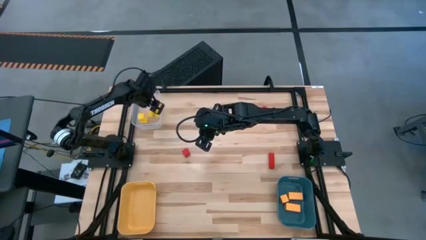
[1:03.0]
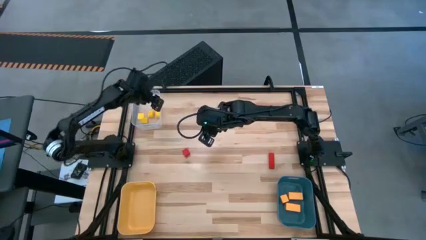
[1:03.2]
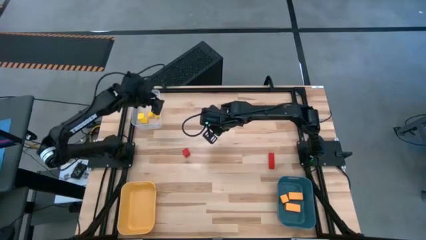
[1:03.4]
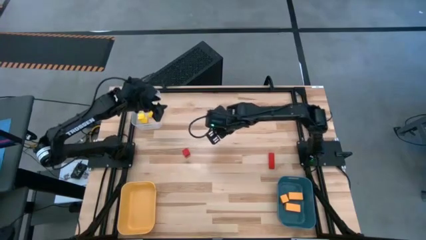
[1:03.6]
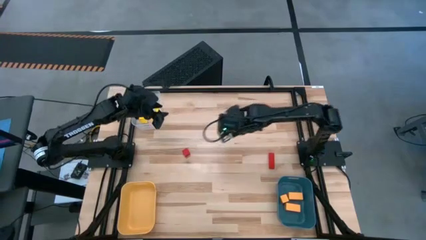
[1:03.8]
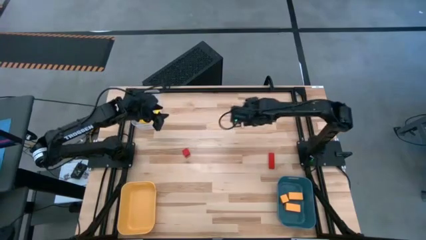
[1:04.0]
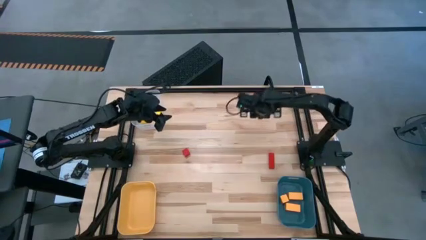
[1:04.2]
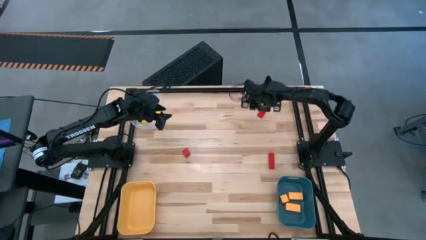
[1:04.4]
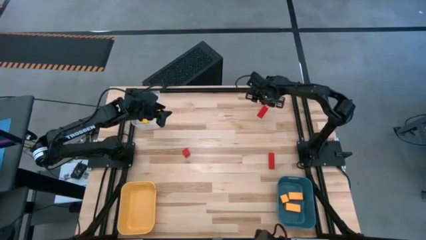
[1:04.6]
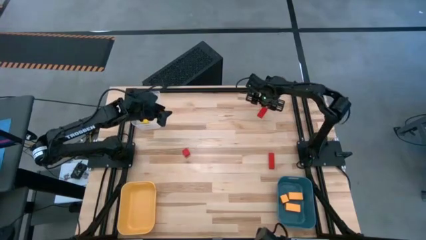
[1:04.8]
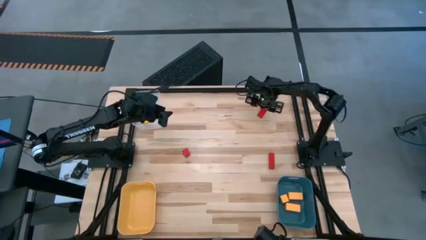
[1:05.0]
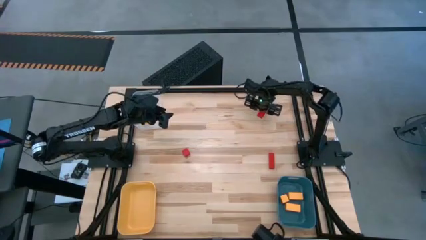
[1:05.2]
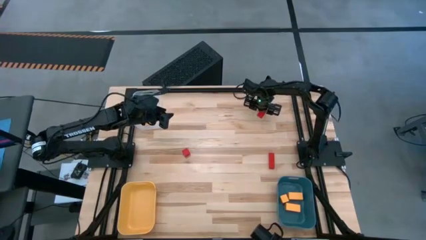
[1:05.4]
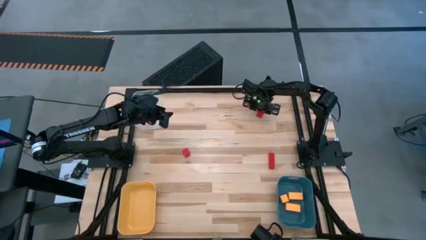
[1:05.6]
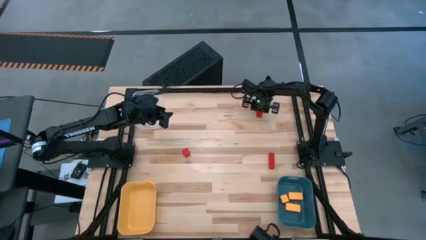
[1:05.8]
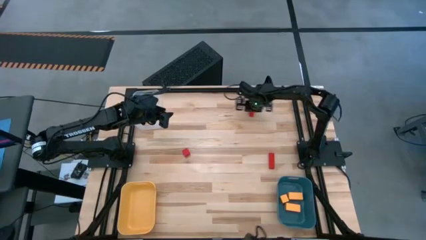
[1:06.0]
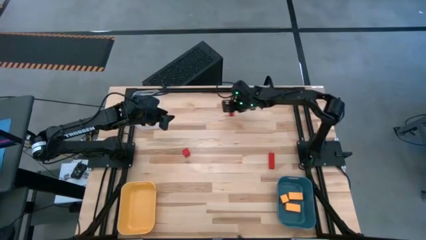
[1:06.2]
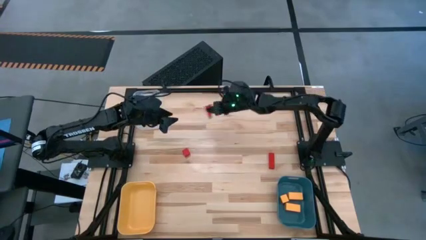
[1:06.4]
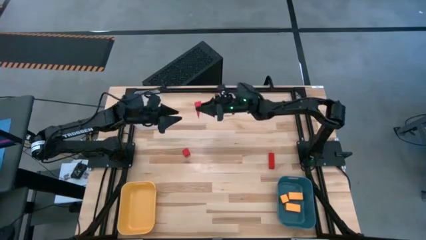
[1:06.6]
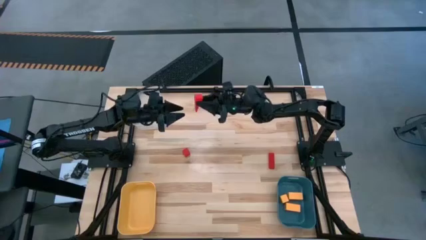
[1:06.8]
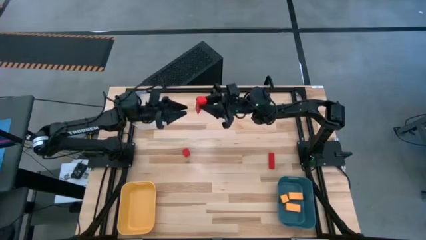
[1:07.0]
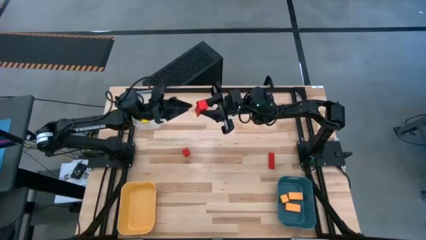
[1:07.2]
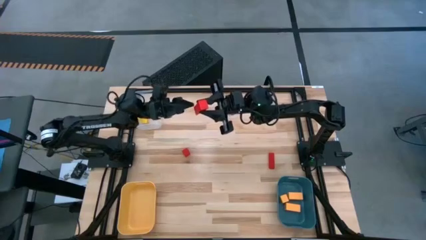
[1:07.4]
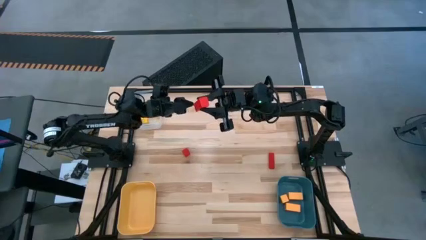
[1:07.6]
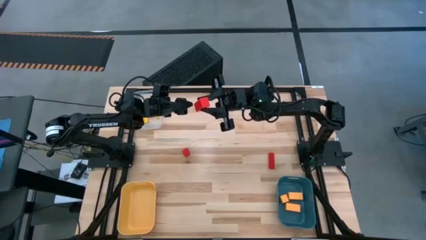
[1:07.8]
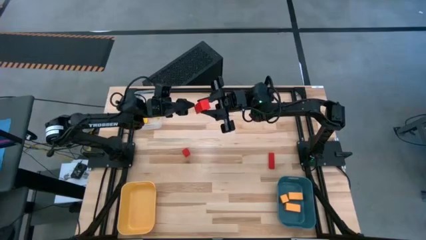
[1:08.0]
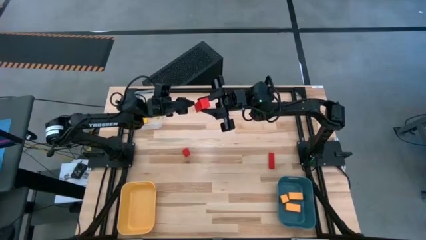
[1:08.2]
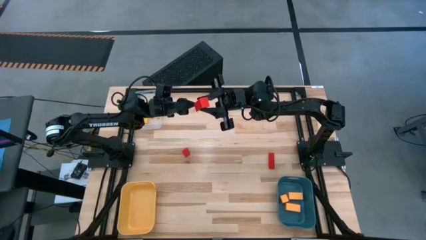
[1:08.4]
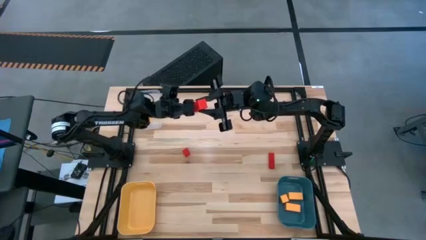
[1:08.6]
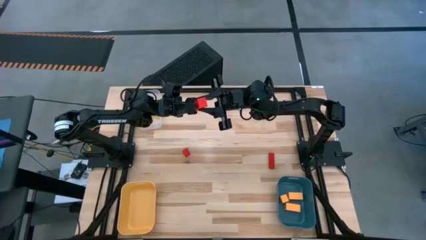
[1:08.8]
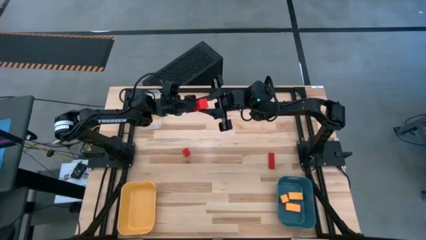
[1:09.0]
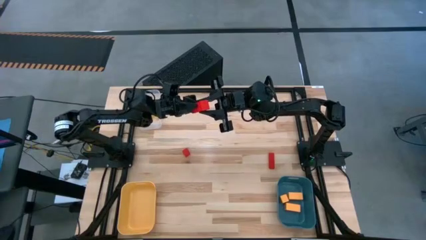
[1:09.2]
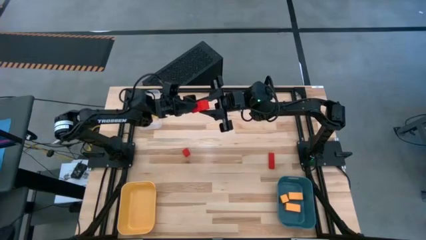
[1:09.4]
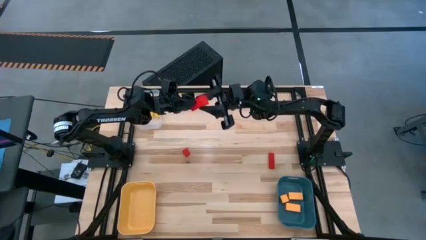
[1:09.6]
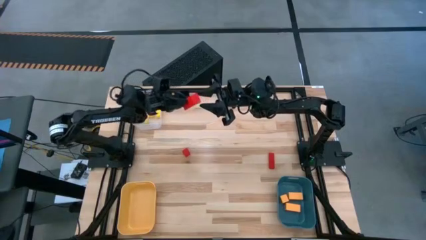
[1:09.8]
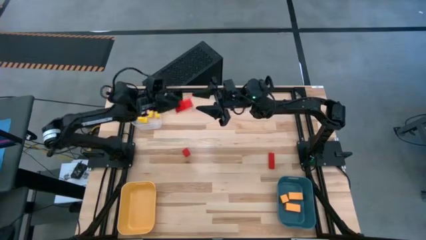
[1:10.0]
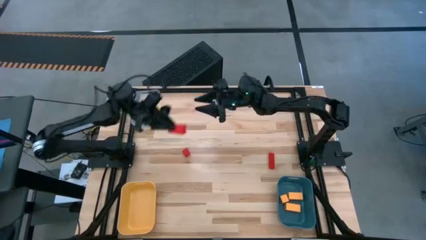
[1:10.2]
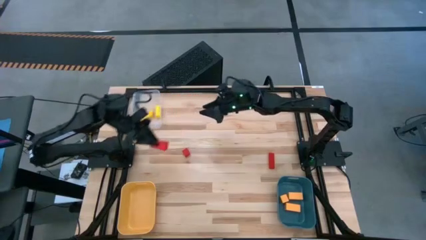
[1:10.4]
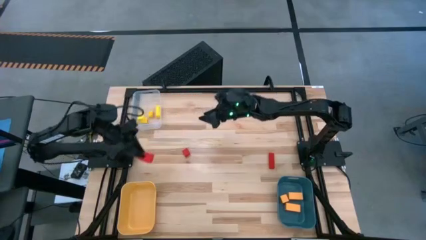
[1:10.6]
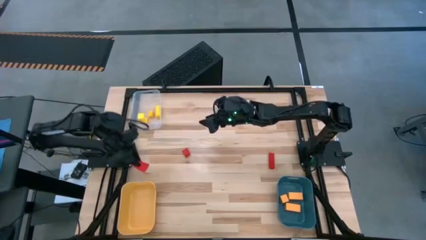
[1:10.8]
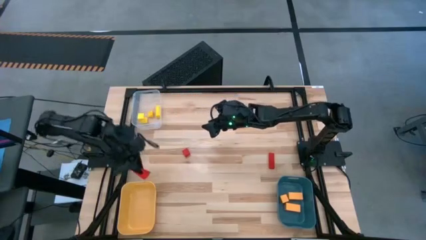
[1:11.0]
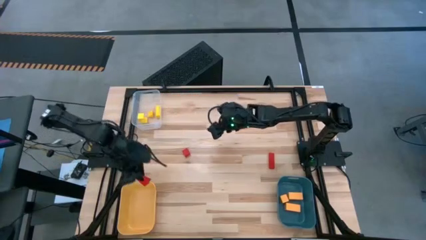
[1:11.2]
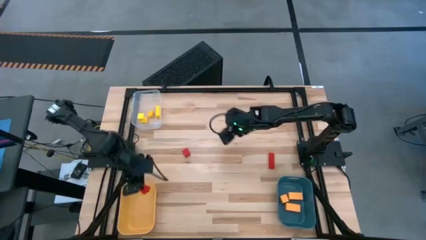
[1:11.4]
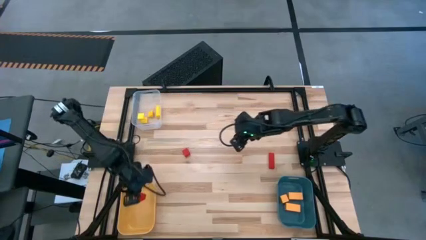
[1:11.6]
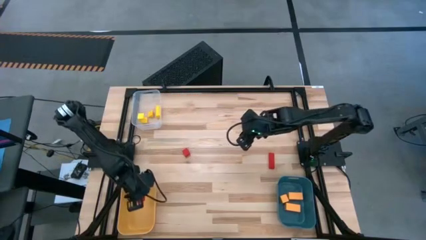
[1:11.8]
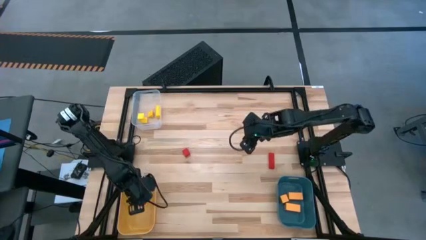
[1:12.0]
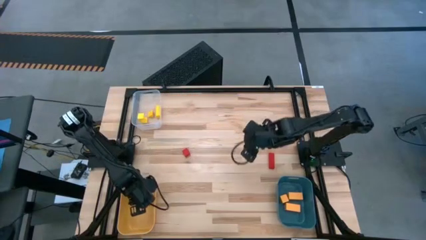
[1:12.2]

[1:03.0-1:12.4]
Task: Sort & place blocks by color
Put the top right red block into the yellow bin

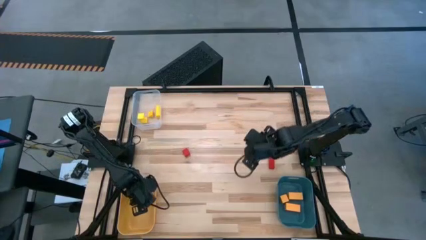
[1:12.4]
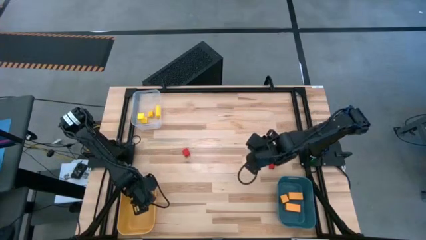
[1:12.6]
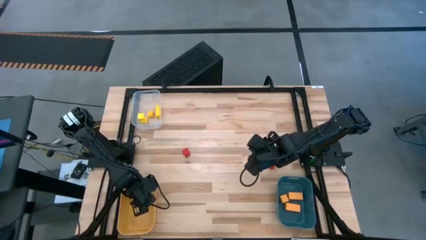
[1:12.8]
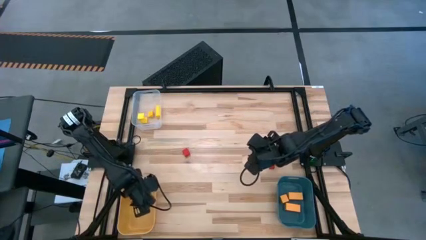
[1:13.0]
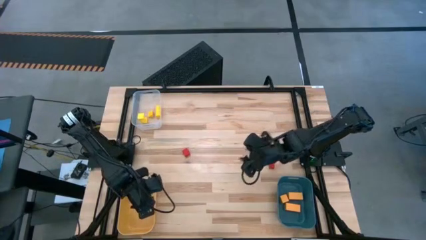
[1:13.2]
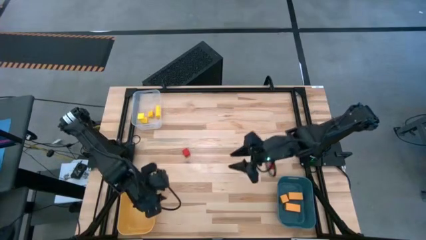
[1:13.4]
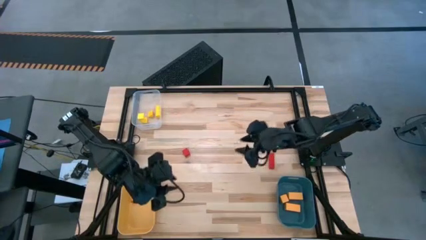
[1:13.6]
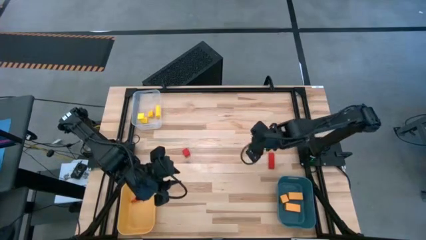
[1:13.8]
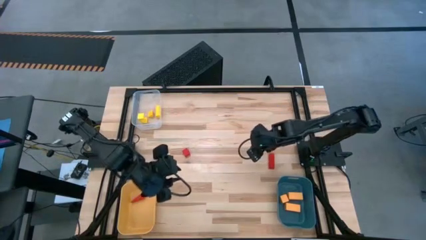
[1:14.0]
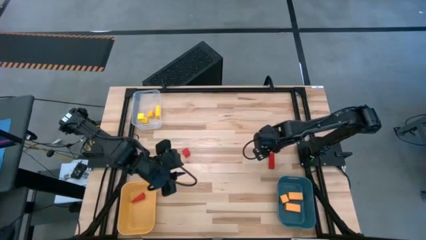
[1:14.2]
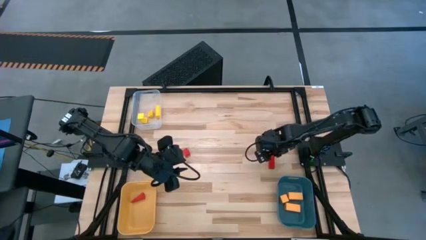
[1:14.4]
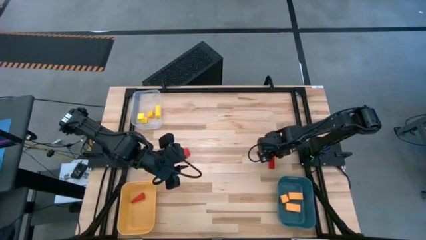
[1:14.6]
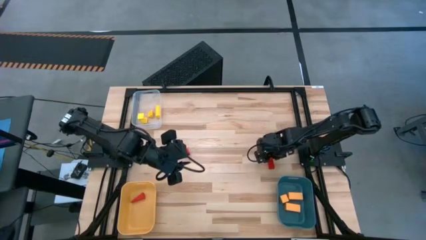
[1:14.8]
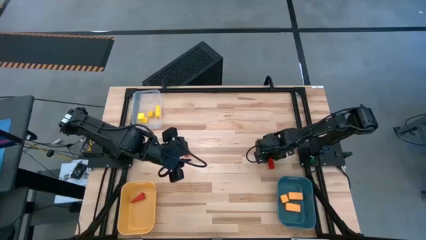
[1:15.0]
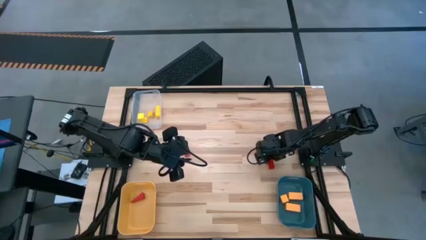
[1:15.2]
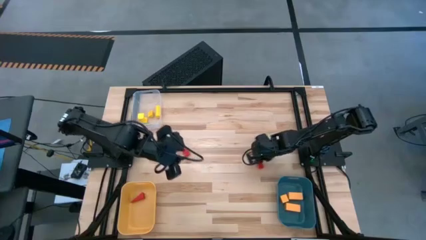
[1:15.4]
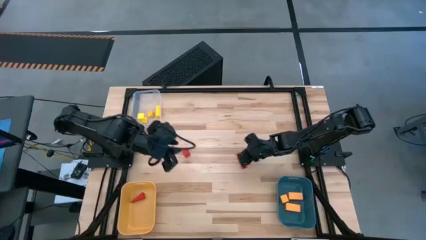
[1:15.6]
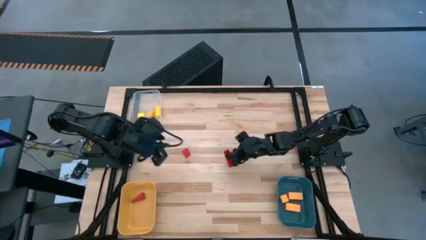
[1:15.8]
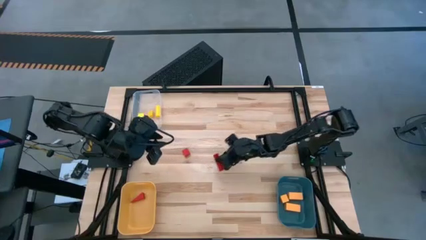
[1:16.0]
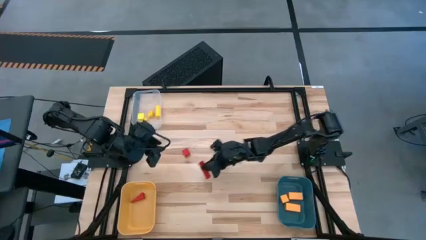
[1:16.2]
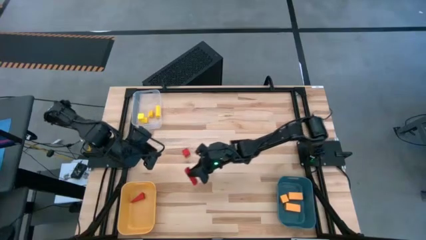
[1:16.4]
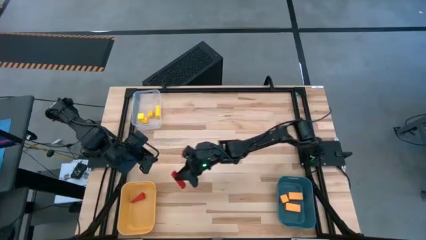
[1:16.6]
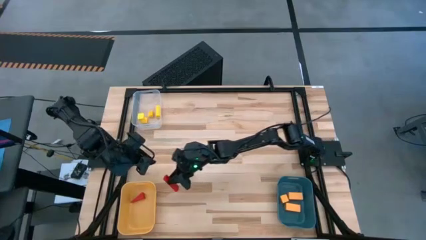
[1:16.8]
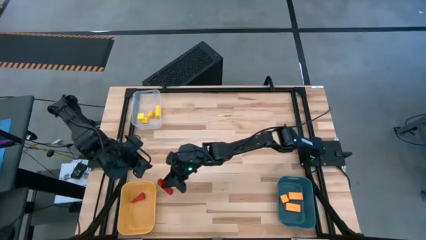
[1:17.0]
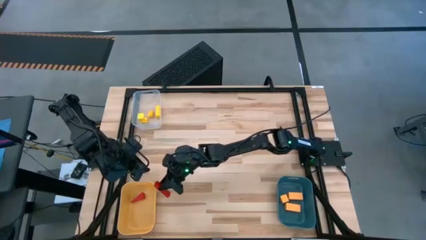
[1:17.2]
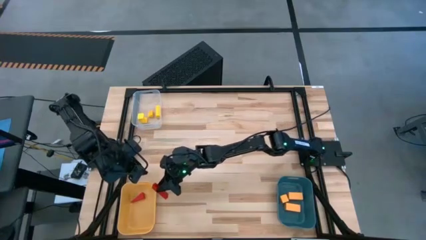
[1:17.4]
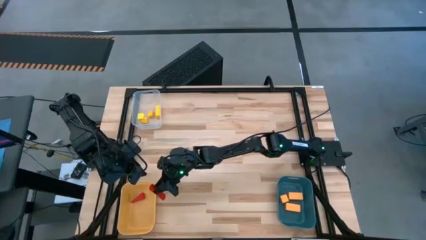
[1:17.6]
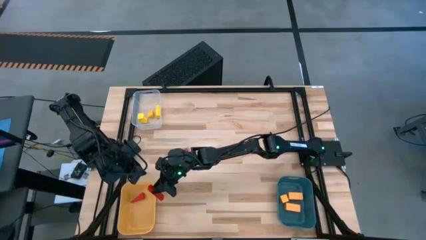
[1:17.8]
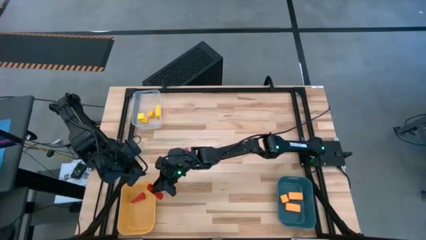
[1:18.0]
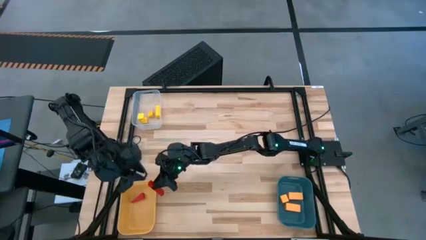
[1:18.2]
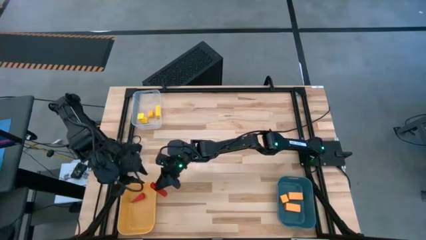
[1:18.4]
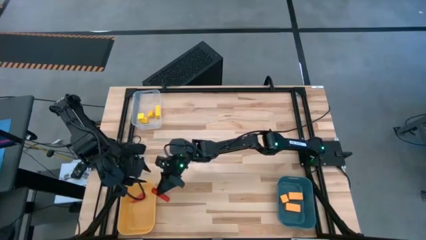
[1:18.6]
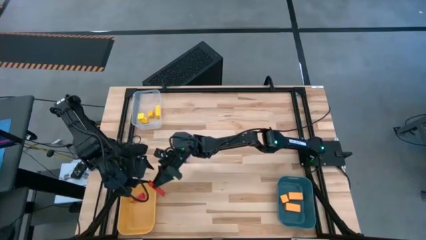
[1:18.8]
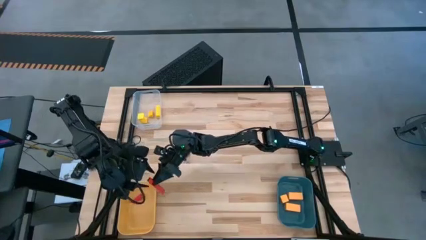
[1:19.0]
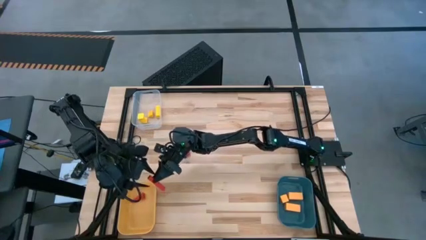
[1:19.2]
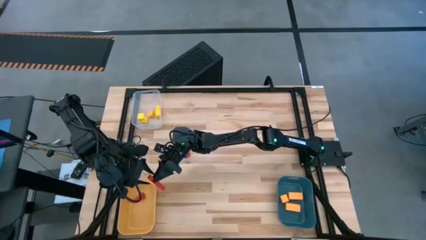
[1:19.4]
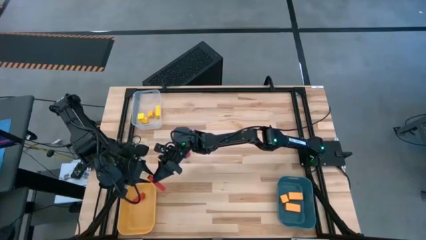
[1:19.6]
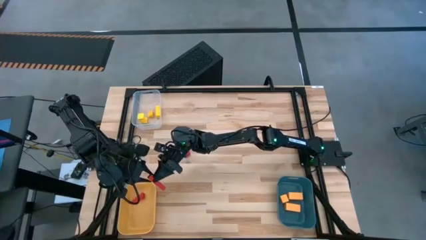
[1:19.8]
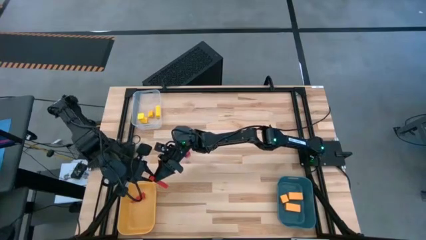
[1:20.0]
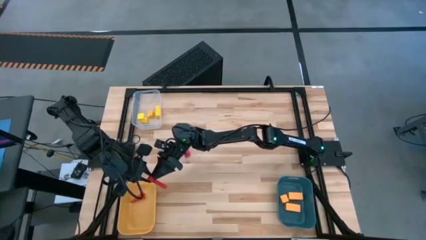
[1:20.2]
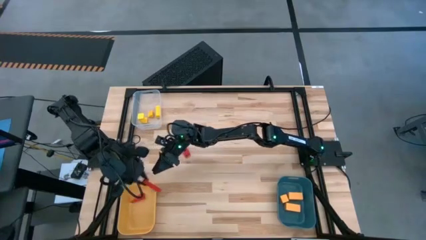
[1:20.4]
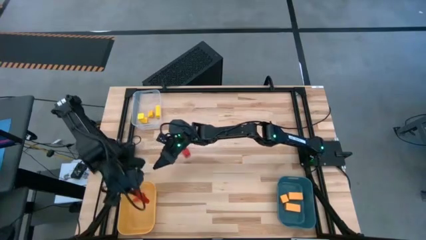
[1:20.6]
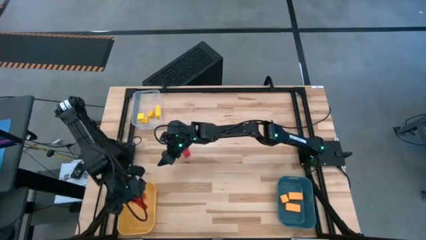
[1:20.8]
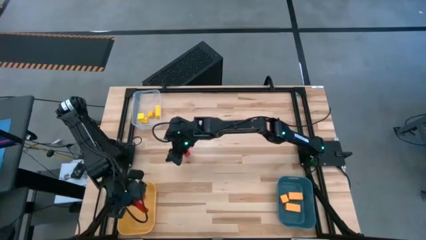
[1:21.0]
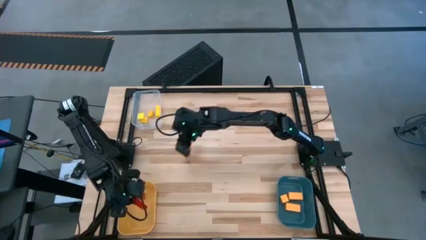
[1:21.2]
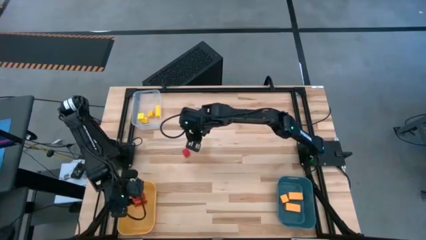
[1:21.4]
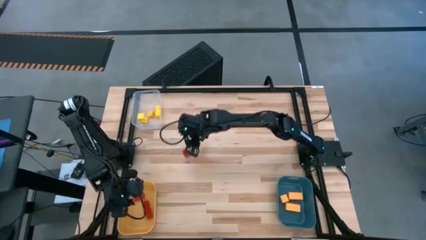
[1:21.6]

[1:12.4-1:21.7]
Put the right red block into the yellow bin
